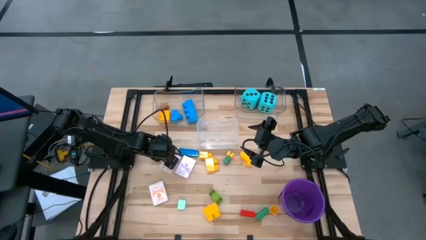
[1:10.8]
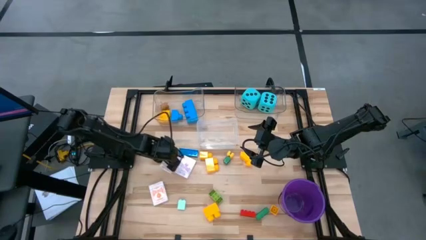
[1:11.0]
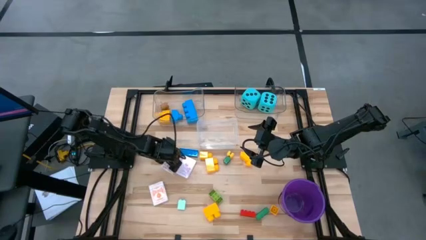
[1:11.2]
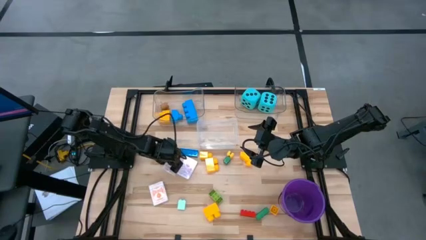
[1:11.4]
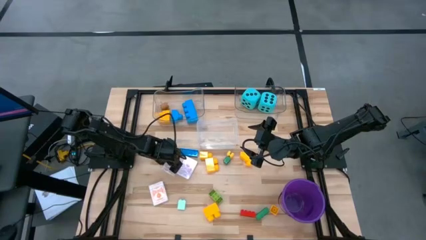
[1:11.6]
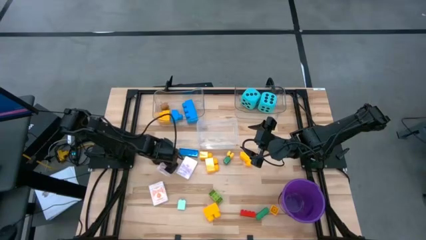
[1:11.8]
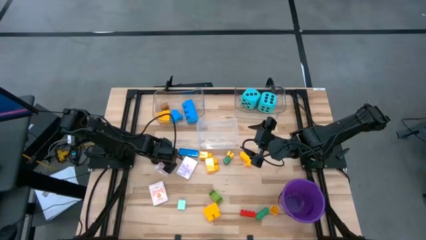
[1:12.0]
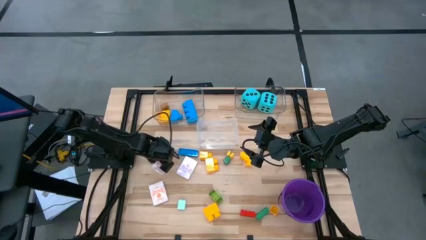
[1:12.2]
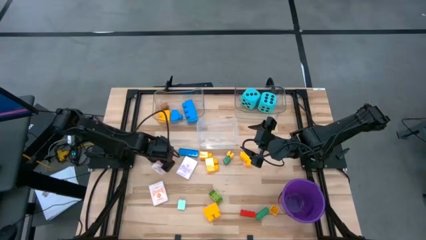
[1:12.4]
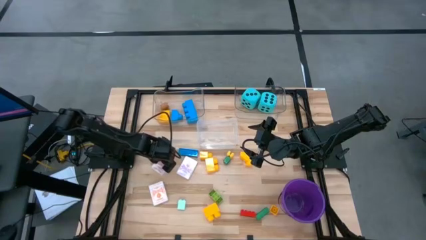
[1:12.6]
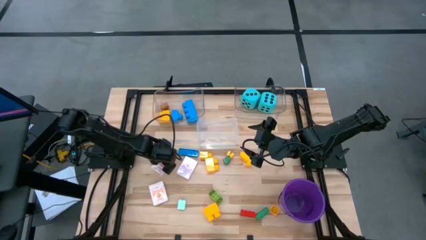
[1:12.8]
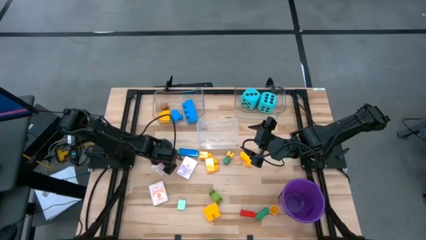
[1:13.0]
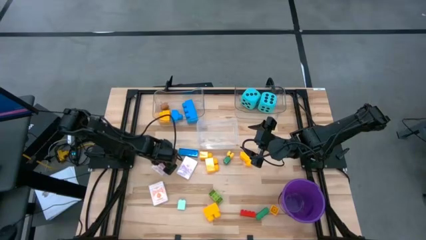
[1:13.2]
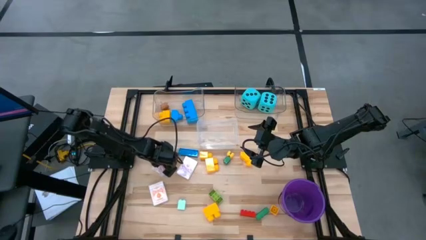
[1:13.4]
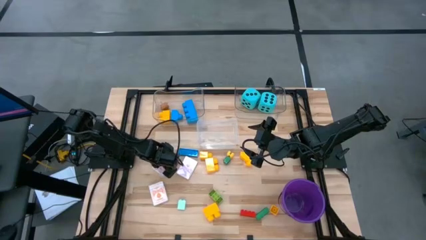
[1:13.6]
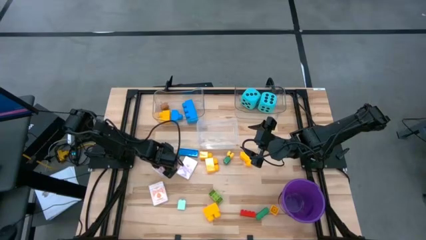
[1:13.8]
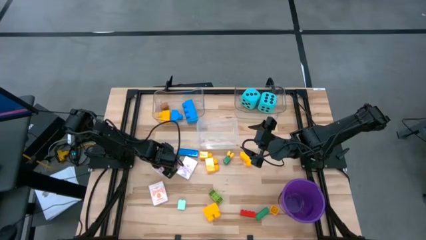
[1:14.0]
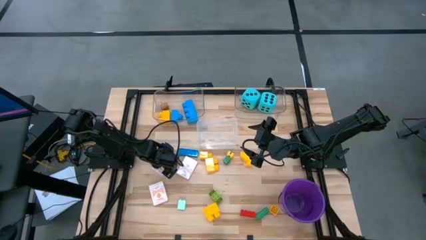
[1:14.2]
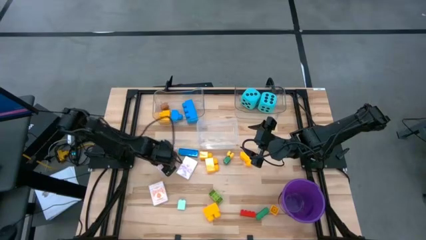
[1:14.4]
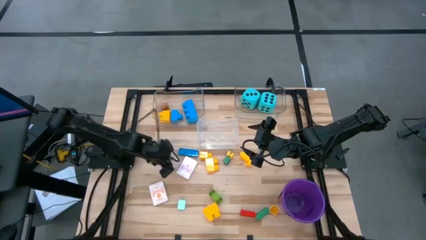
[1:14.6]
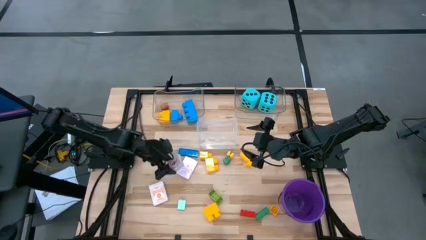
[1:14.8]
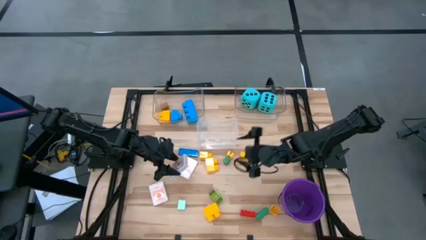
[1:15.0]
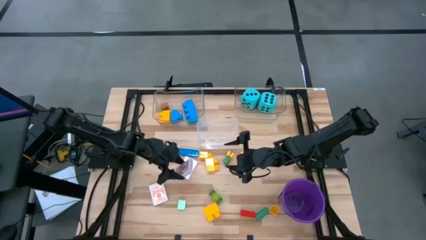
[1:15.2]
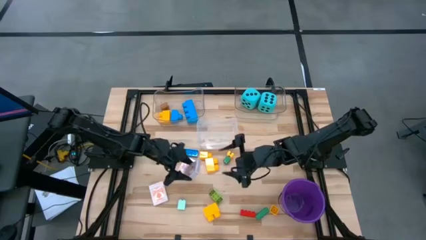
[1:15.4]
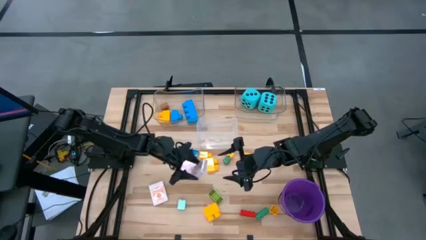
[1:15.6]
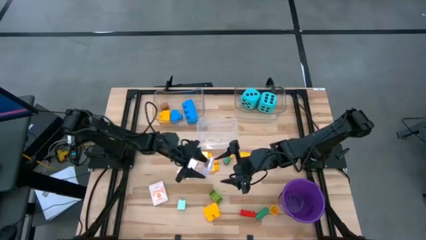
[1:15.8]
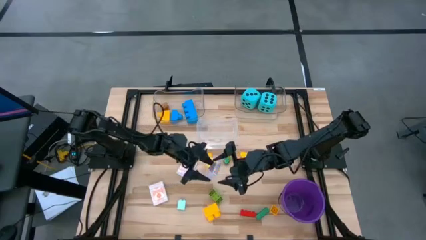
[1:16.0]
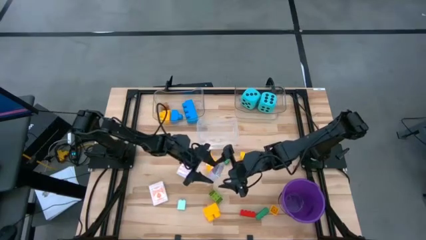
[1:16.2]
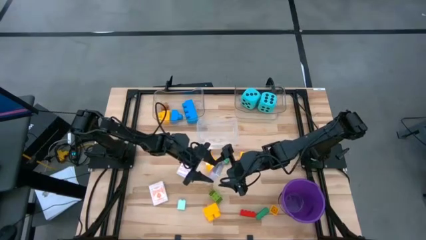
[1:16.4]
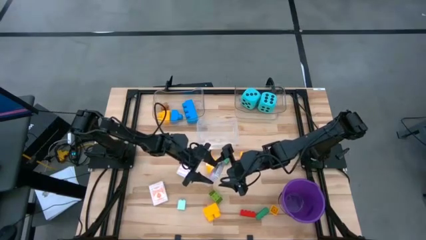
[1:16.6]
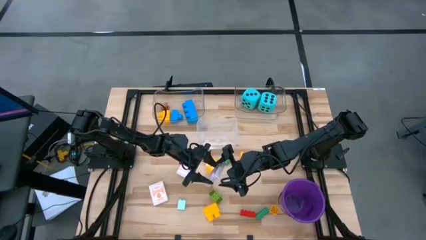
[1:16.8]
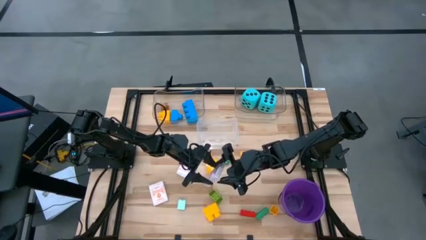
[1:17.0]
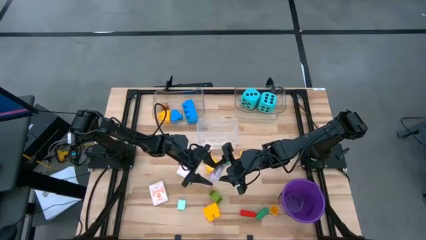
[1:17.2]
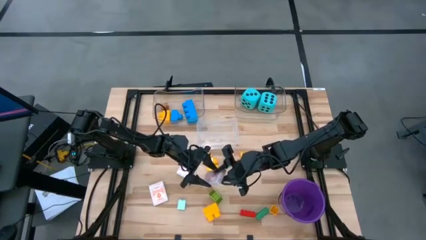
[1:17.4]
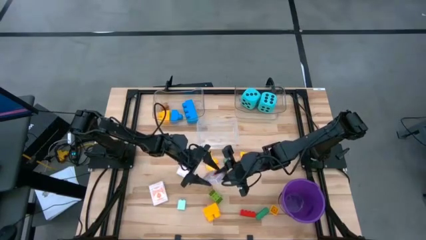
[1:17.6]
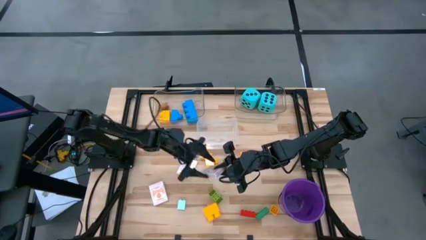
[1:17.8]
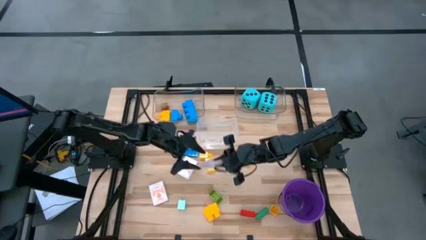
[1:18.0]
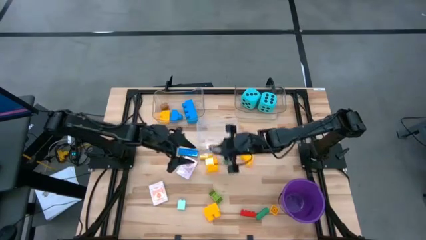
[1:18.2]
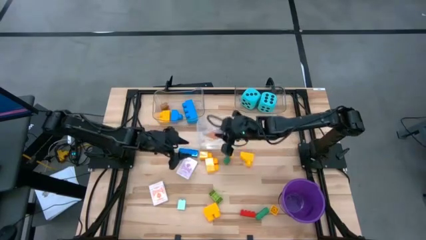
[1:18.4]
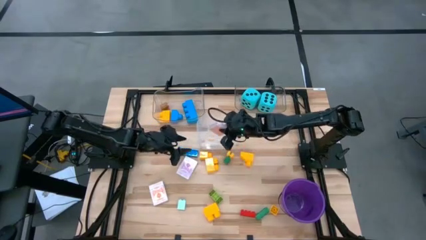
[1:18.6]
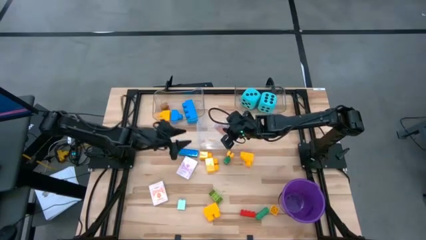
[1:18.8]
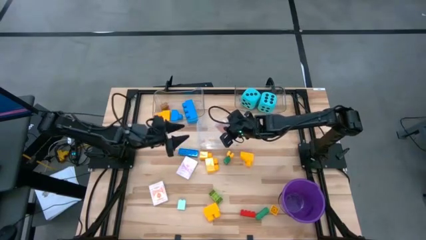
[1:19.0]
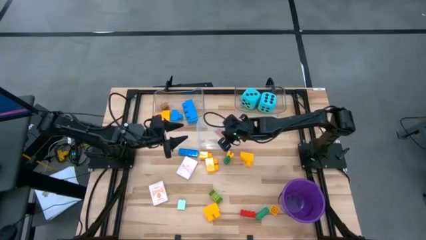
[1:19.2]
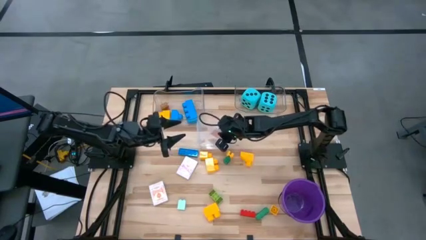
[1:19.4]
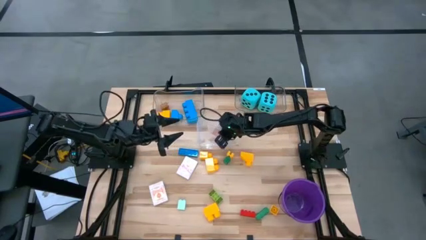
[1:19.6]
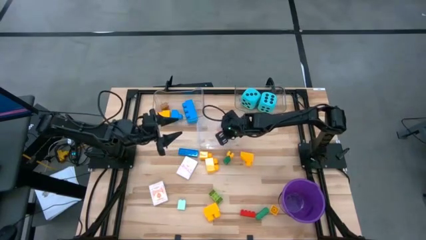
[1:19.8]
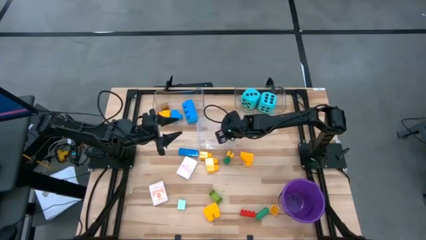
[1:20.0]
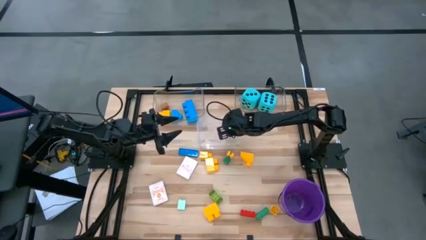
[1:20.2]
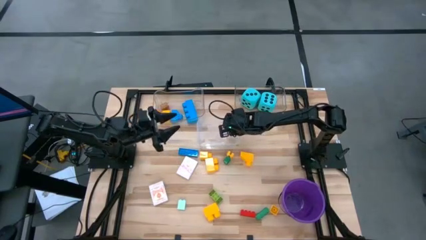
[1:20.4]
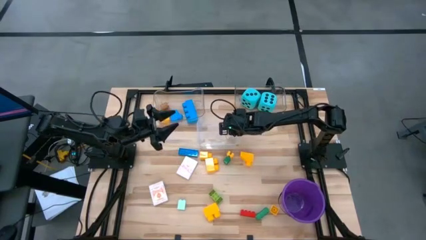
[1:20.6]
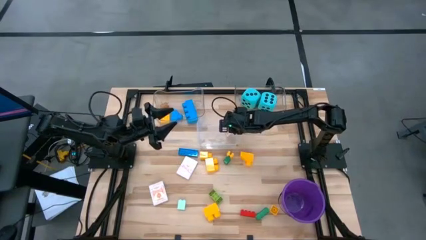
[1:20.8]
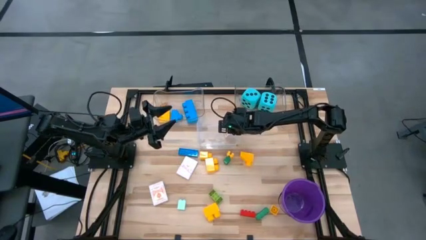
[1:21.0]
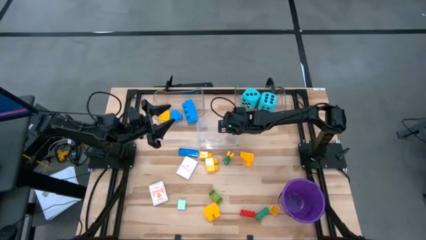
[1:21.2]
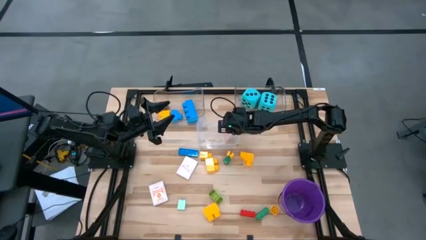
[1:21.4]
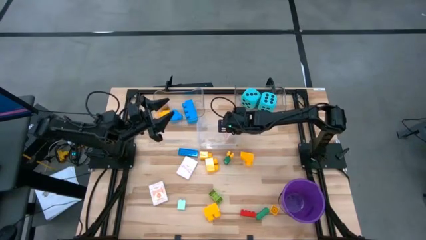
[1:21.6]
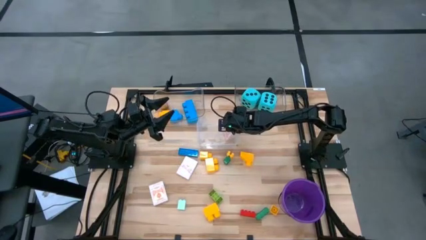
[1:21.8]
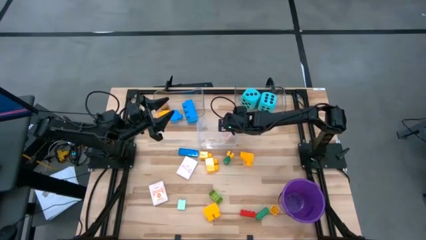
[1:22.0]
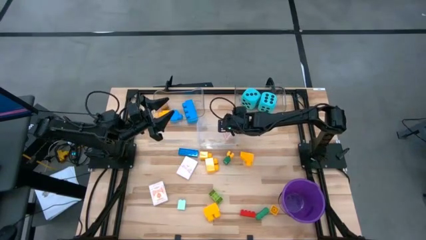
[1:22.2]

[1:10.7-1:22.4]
Task: Pick & Place Toys
Put the red deck of cards into the bottom transparent bin

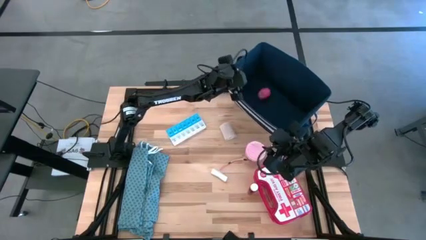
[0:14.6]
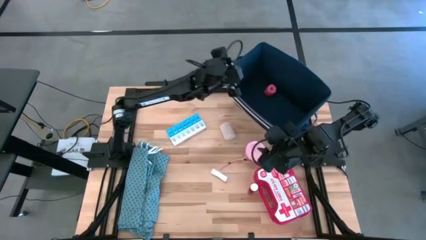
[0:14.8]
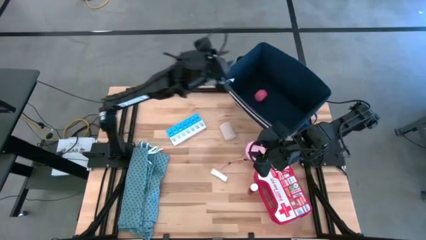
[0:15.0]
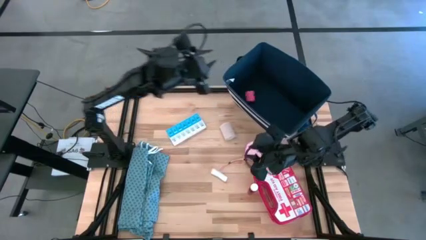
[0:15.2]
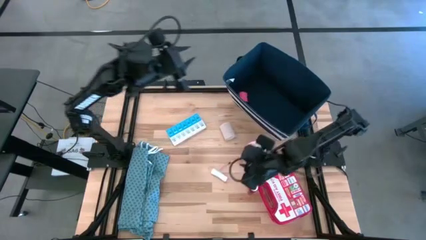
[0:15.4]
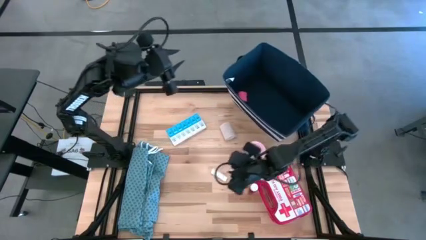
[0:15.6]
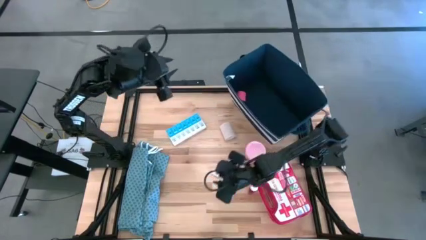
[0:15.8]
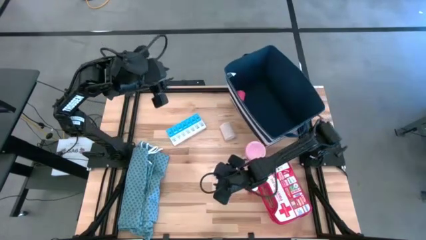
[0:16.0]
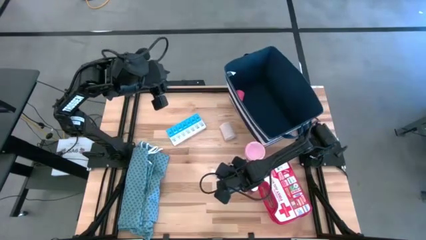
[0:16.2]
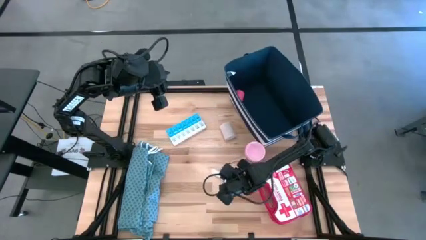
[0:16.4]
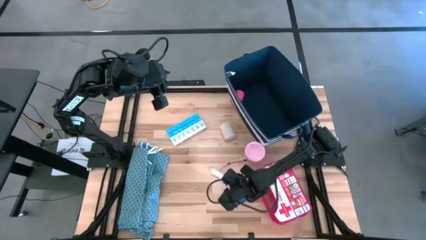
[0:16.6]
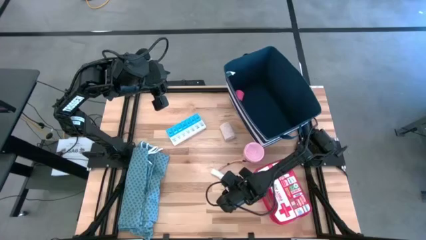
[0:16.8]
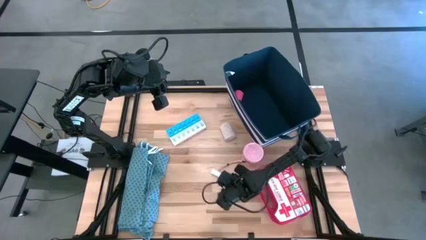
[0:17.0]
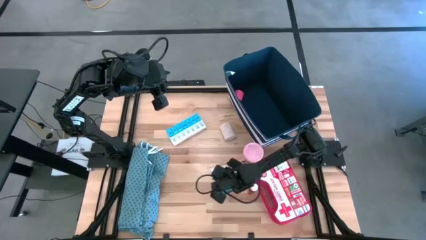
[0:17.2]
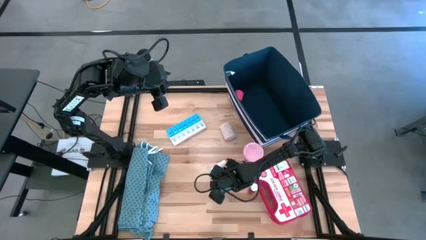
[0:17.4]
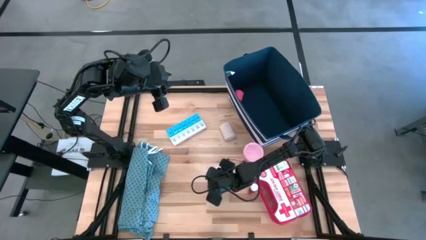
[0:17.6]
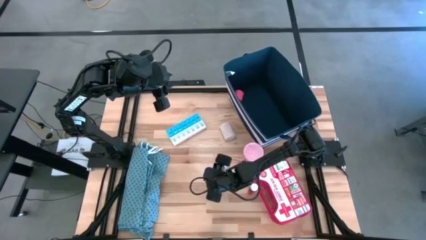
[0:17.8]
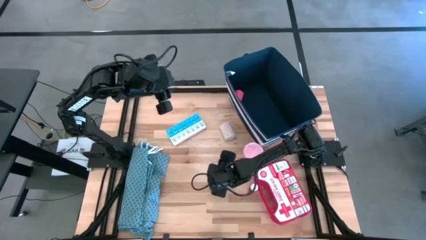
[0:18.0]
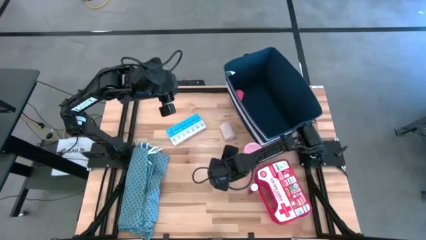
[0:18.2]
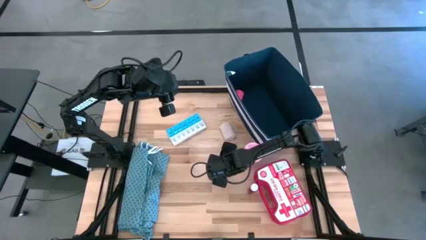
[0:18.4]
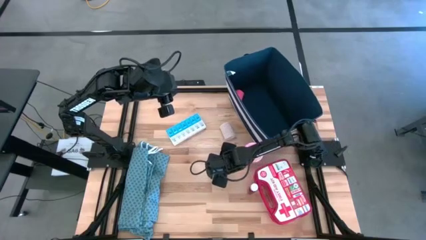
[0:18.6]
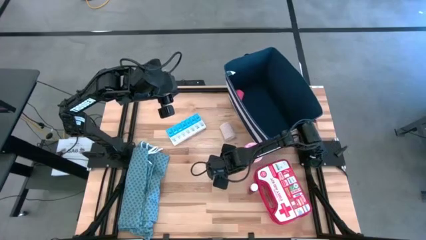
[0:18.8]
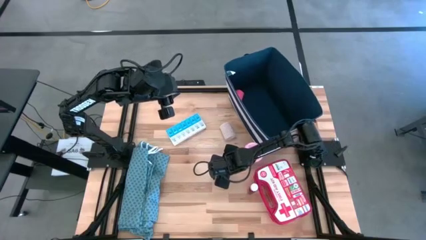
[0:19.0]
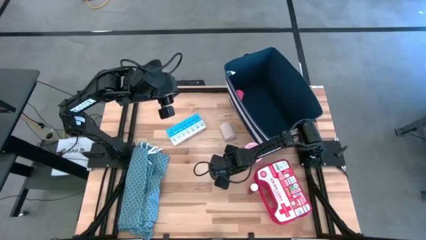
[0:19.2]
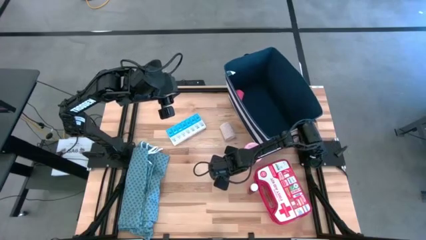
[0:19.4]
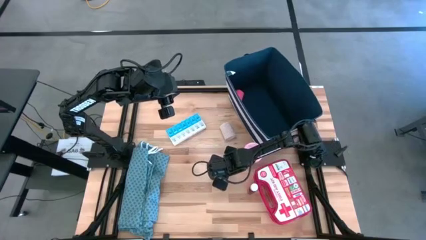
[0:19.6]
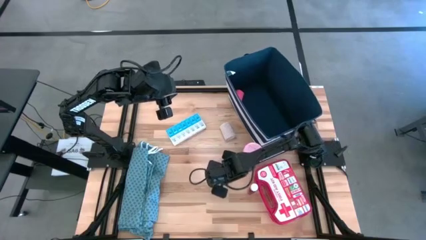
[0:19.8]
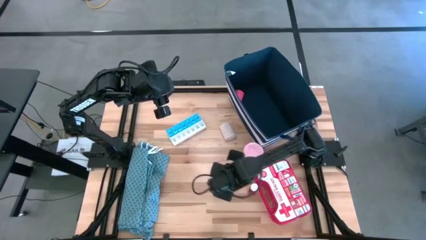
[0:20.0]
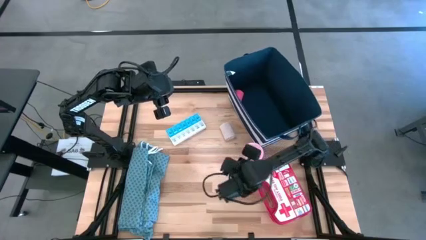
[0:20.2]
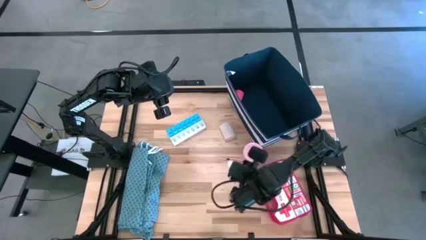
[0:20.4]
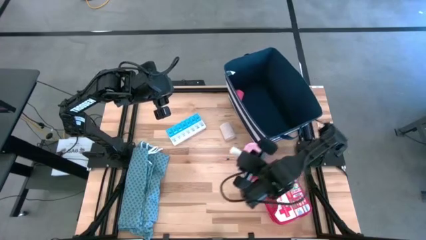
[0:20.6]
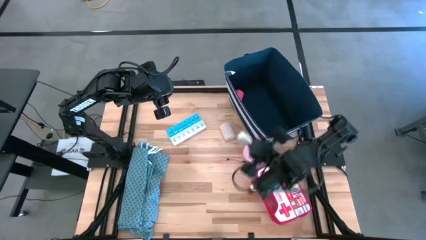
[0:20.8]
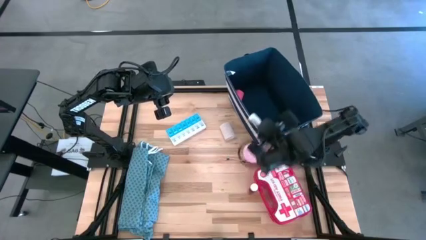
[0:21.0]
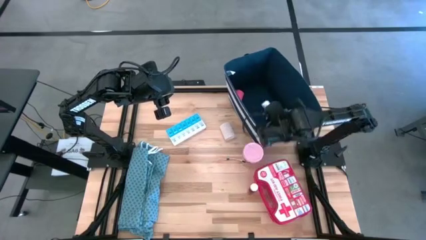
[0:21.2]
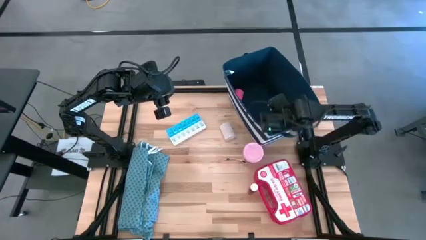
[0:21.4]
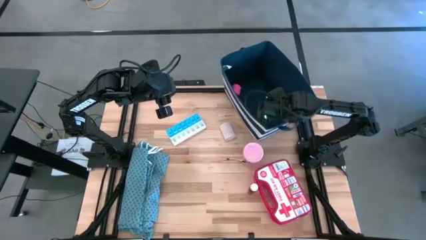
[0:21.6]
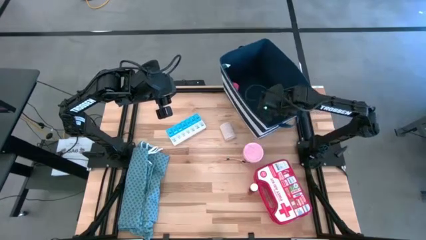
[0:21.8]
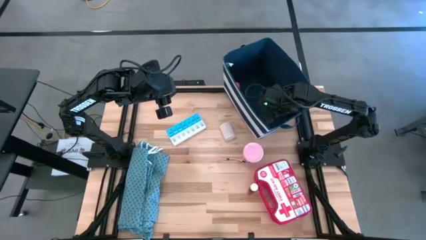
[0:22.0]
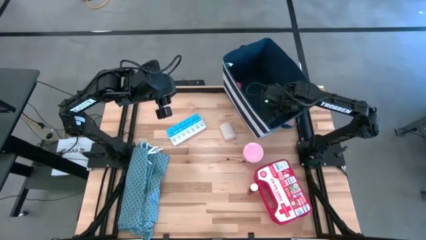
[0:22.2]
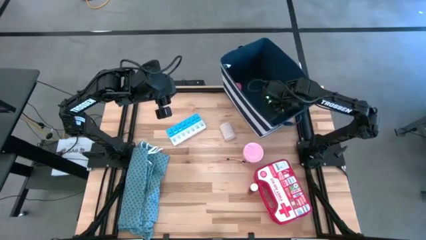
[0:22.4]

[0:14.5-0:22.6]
Task: Pick & place medical supplies in basket/bin
Put the rolled gauze into the blue bin
